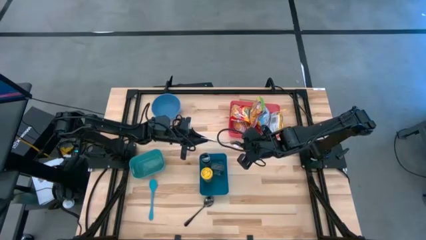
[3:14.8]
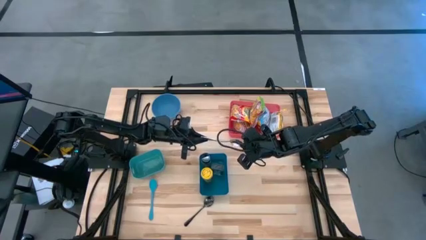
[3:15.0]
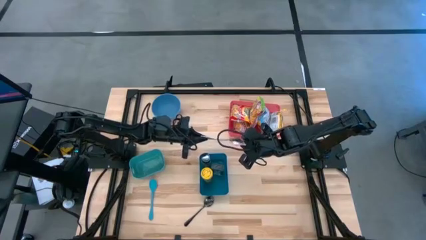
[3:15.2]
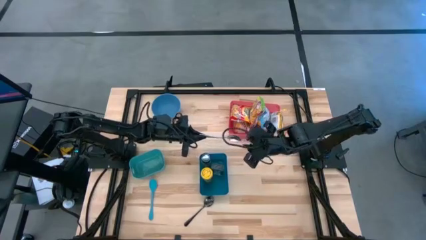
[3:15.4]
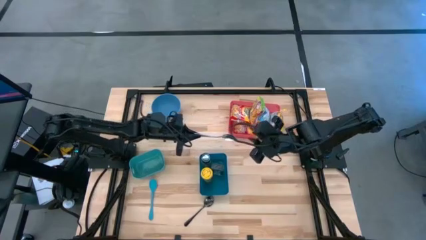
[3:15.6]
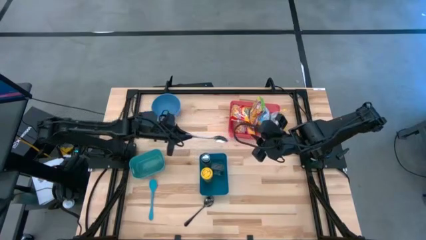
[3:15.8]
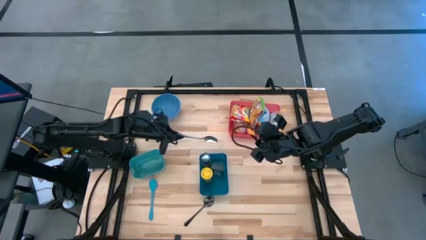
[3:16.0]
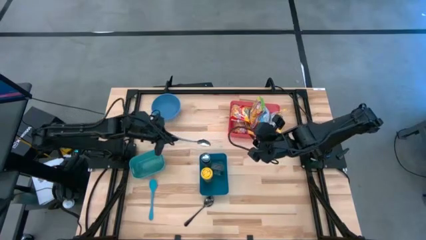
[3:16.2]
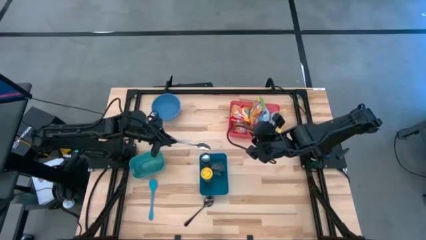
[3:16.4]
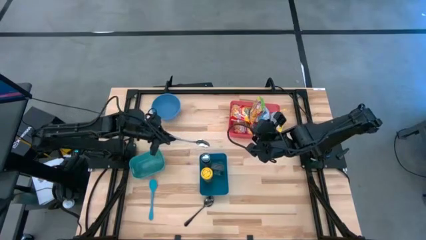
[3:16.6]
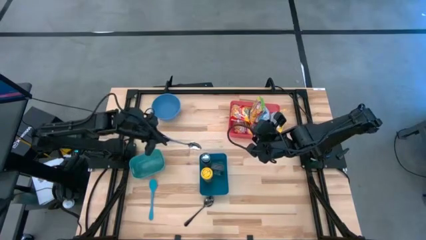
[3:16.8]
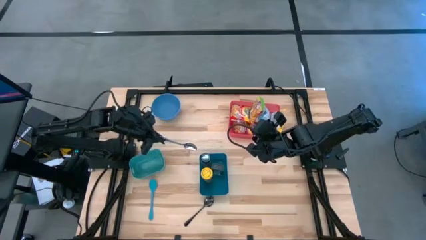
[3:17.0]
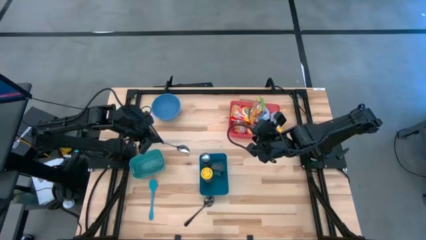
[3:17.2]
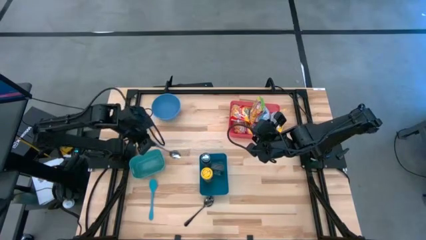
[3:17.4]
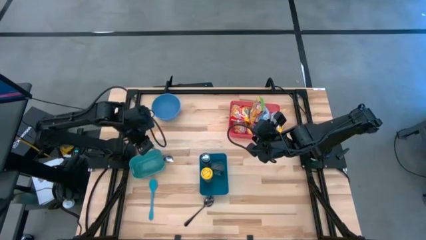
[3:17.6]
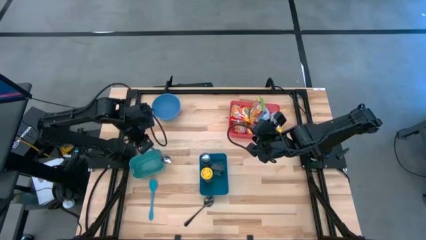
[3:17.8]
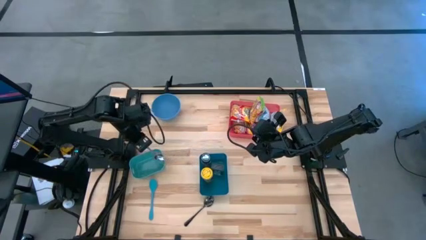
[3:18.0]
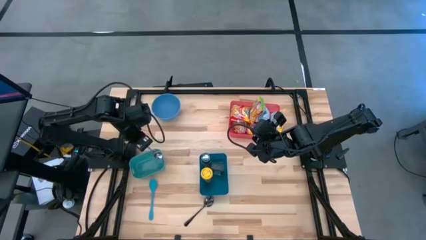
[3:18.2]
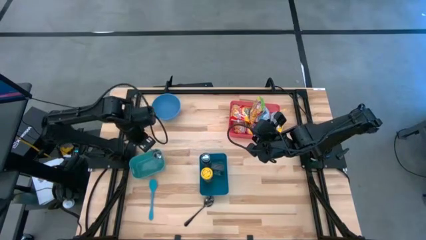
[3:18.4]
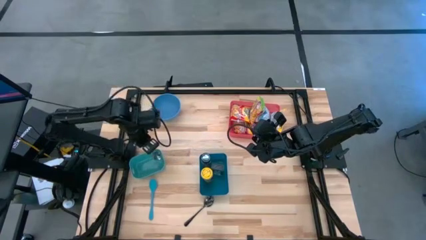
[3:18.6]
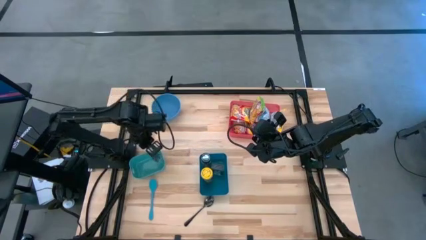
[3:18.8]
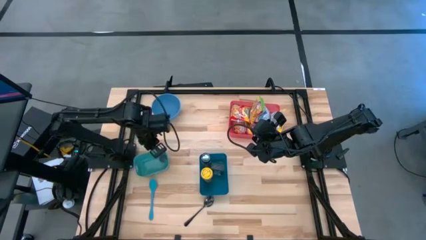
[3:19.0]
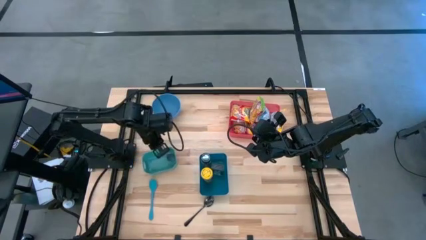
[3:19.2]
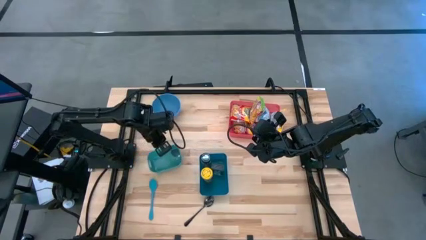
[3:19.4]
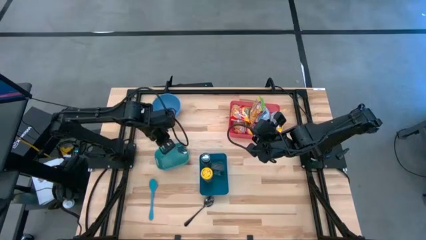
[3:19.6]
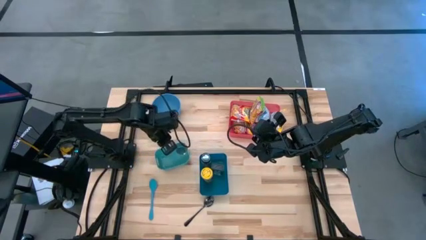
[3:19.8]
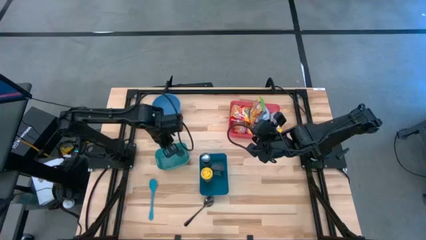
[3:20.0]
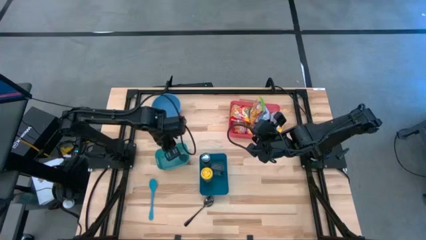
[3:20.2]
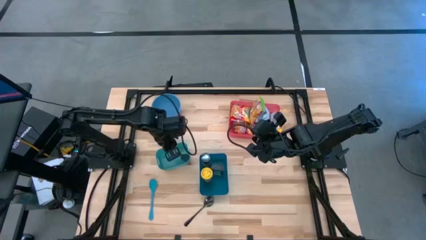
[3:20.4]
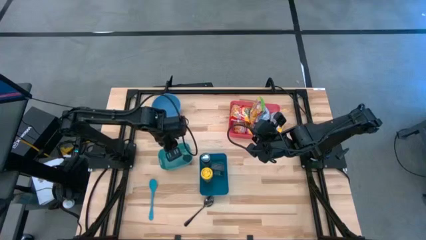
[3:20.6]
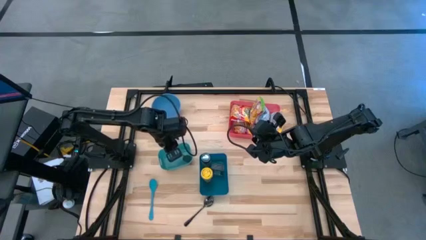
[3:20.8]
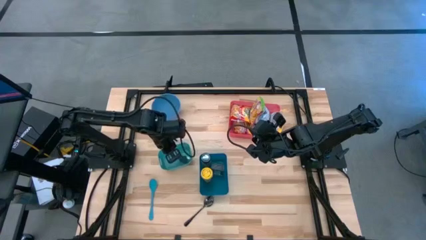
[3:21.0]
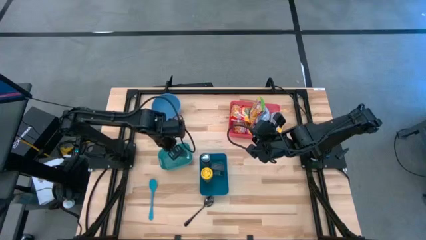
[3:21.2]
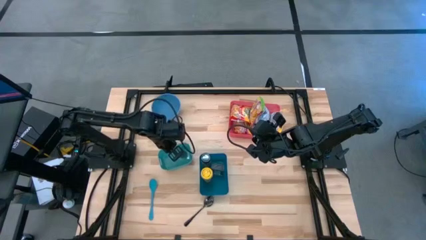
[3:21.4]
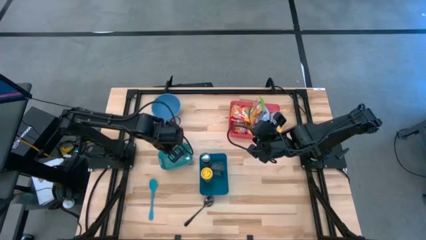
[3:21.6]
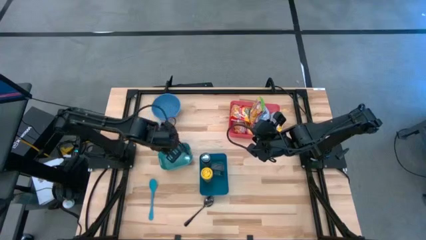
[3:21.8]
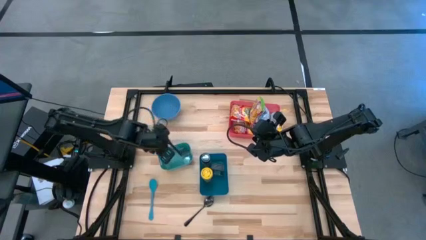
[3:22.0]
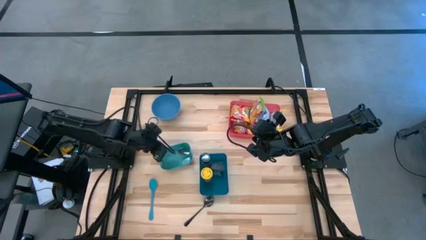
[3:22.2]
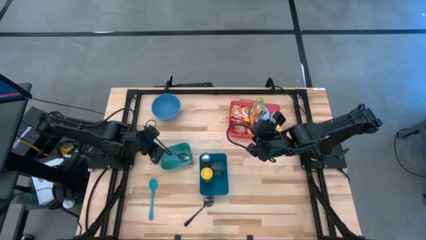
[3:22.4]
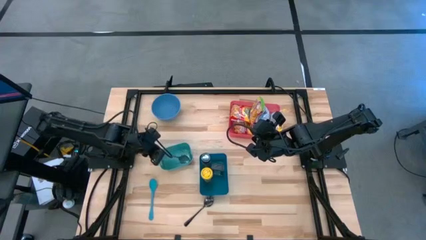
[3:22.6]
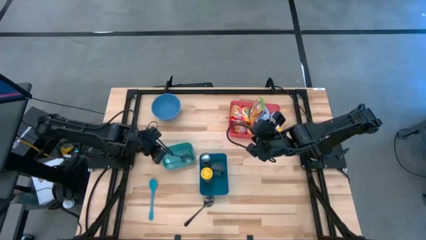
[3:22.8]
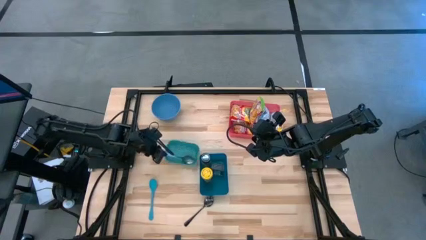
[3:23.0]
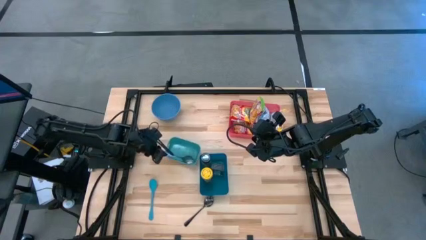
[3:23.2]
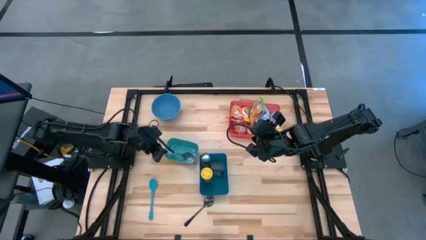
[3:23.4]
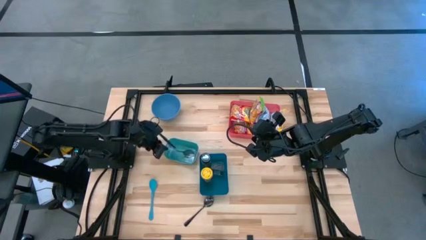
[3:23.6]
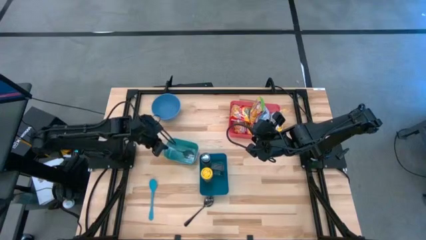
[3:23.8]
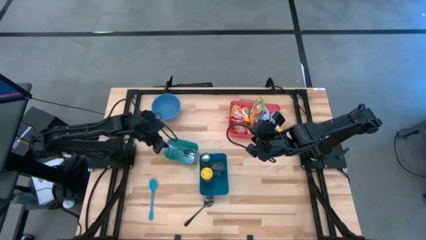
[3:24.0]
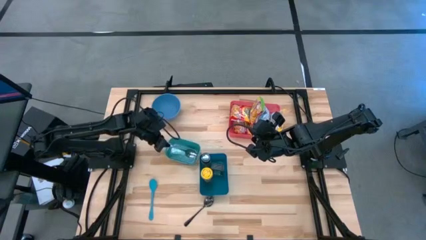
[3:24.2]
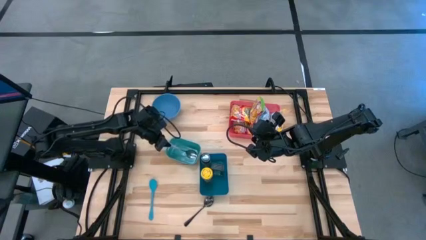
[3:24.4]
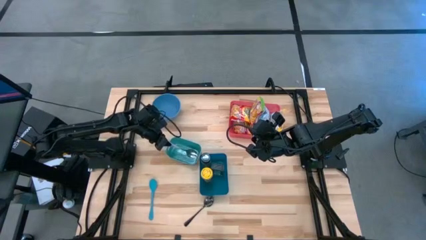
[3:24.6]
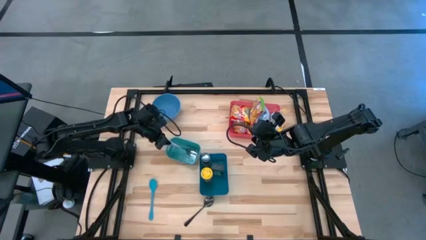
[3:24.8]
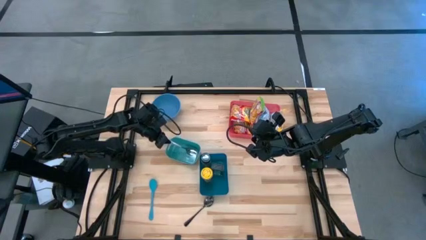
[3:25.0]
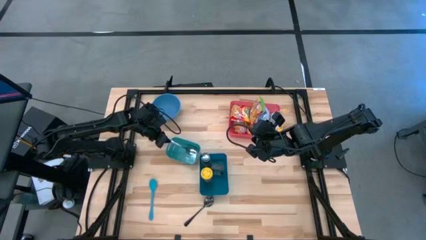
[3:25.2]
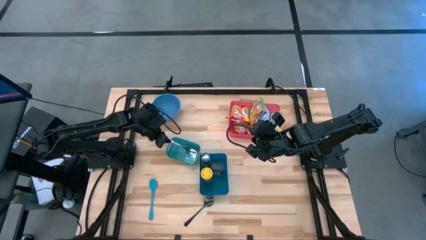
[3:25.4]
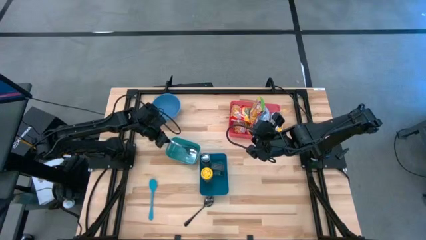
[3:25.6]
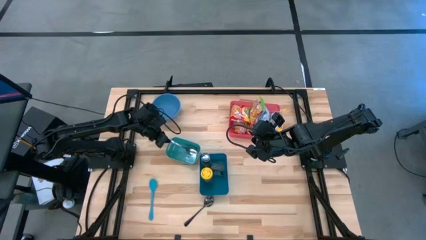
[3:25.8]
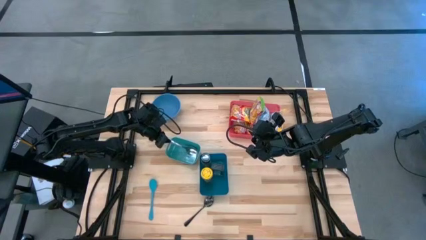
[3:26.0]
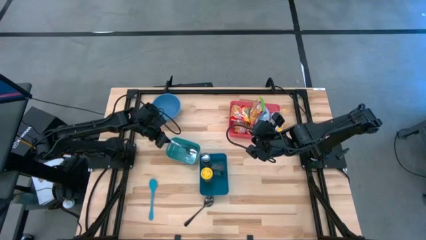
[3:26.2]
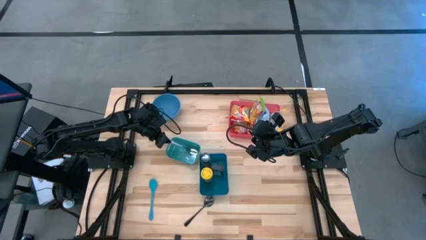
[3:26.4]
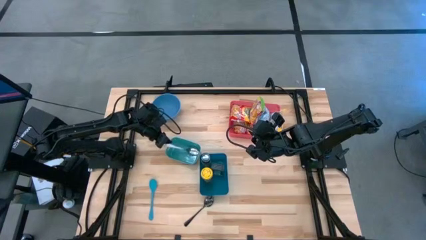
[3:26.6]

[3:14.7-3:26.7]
Task: Pick & Place Food Item
Put the silver spoon into the green bin

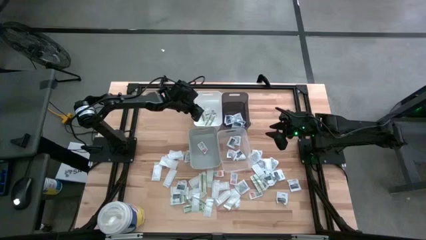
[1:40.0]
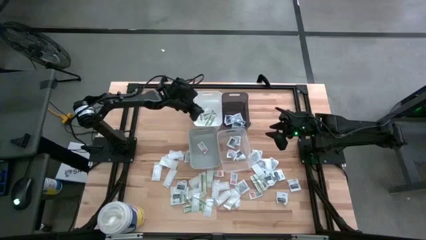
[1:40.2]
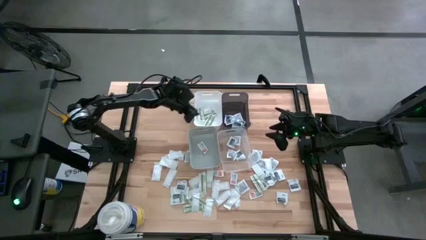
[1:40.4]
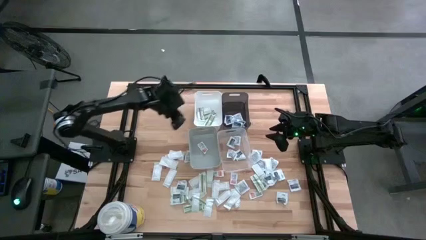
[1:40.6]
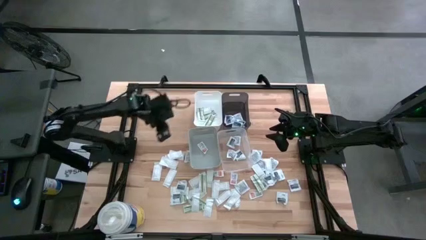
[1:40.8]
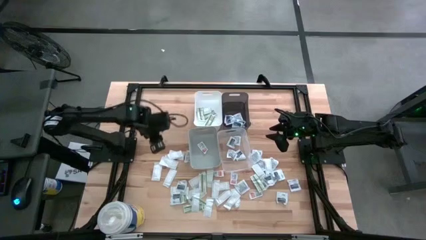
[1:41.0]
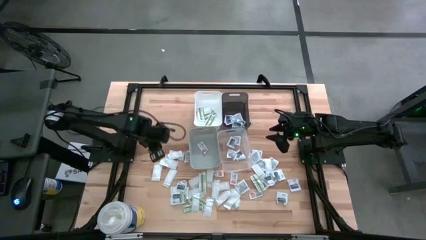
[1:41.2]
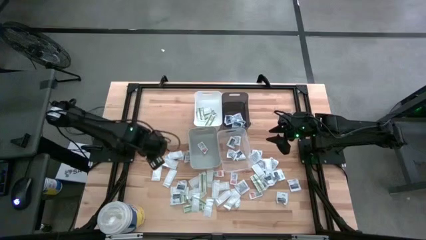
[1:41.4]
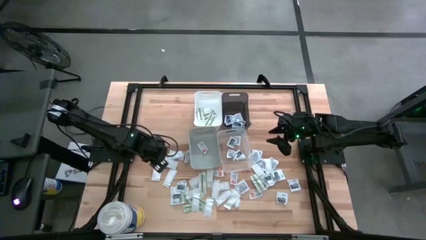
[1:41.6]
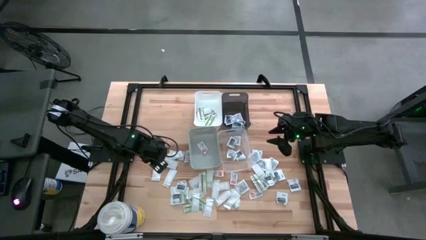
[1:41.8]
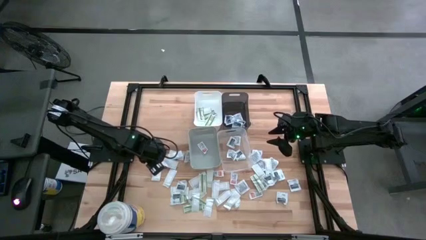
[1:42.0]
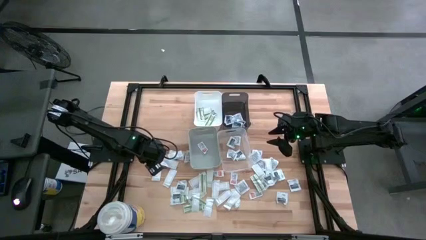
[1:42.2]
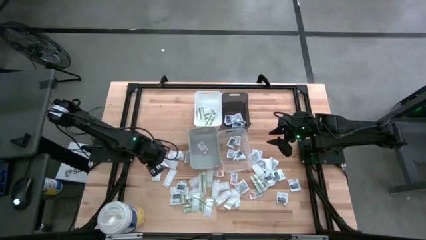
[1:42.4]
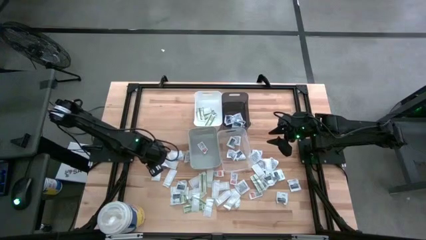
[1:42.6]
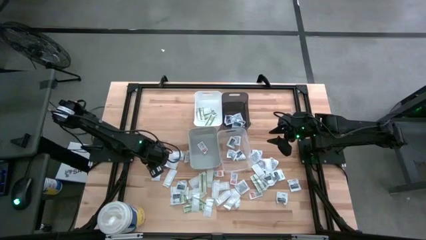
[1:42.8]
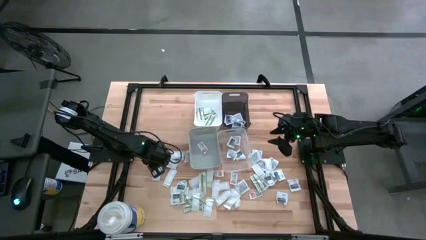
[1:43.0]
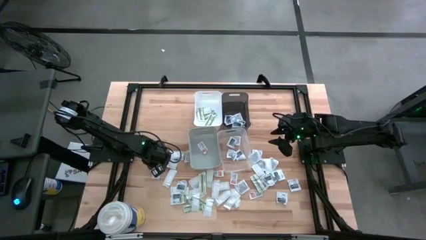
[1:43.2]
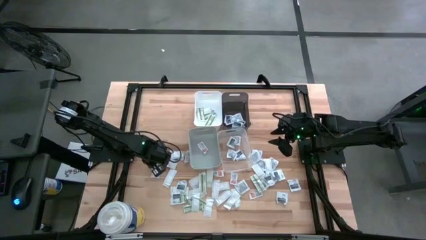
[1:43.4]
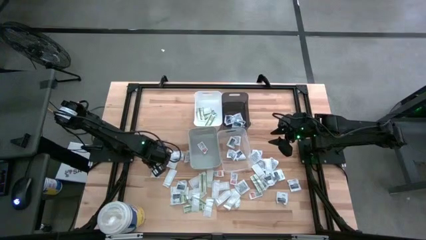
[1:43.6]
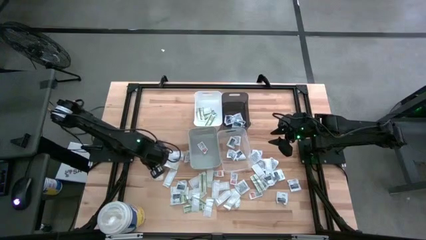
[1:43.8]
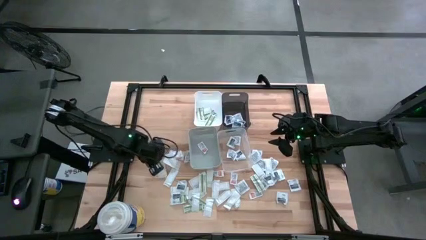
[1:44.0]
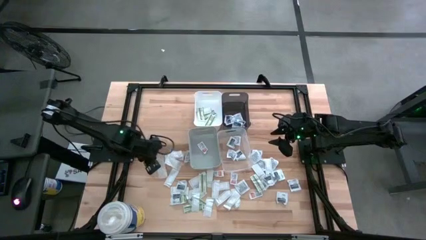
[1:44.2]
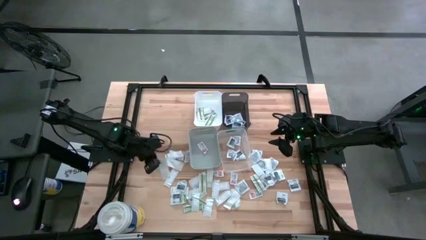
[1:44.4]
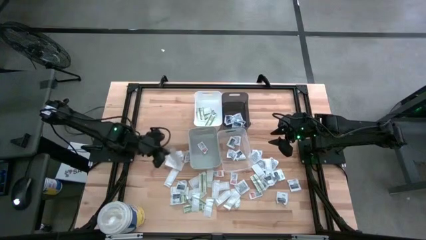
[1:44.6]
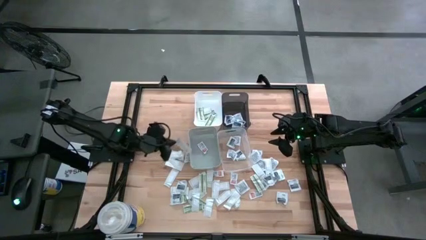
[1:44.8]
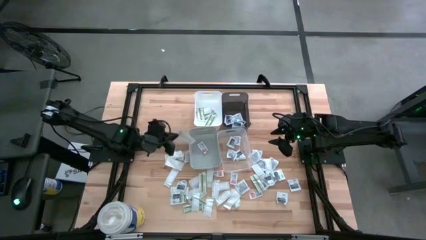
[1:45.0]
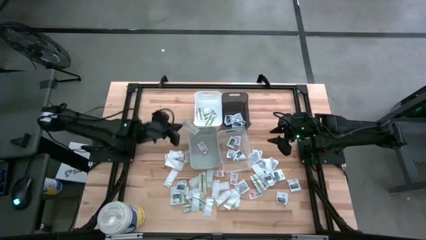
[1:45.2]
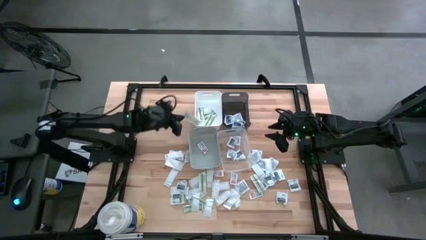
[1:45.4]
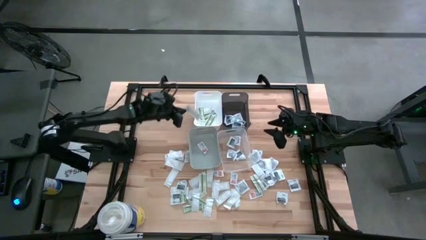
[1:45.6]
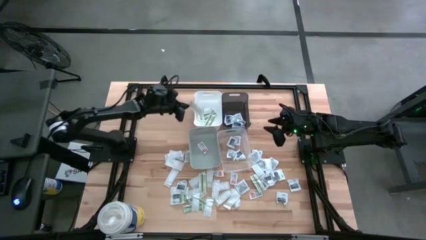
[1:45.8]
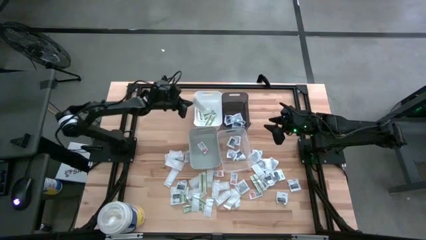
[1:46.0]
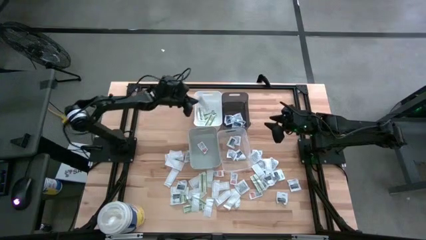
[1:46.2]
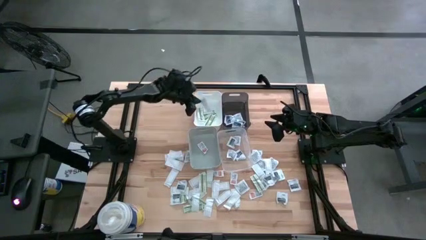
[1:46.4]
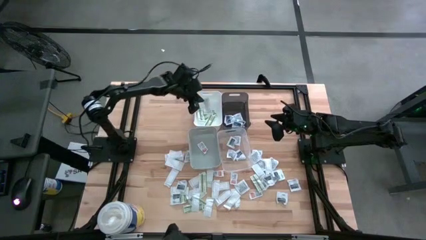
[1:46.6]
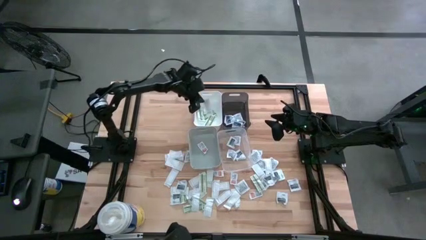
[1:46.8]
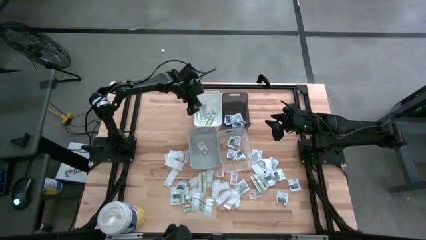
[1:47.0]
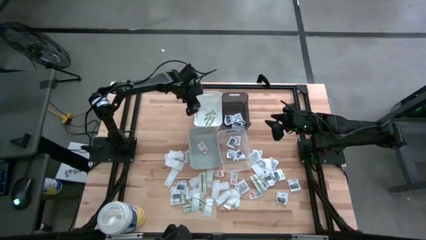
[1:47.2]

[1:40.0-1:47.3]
Task: Pick & Place First Aid Supplies
Put the green bandage pack into the white bin
